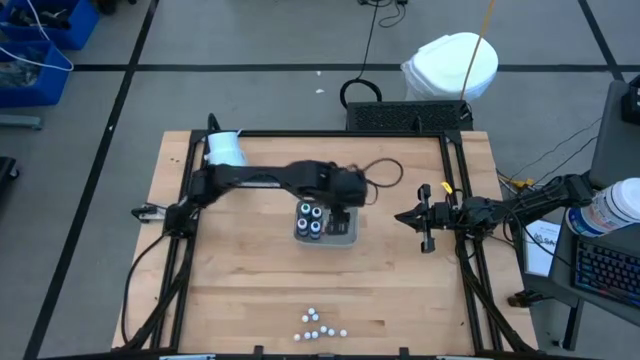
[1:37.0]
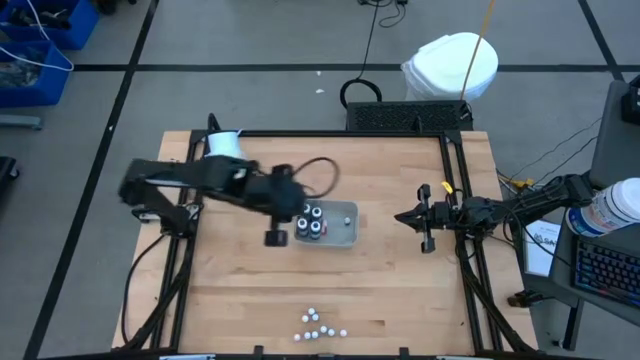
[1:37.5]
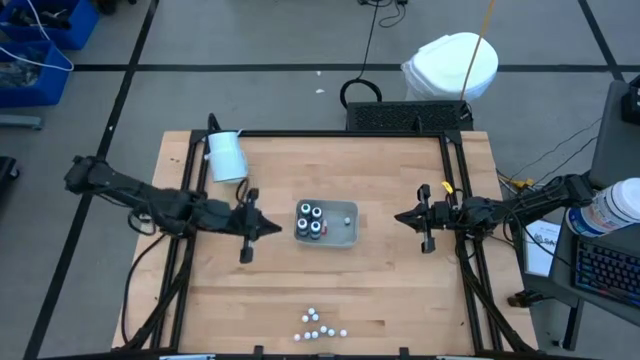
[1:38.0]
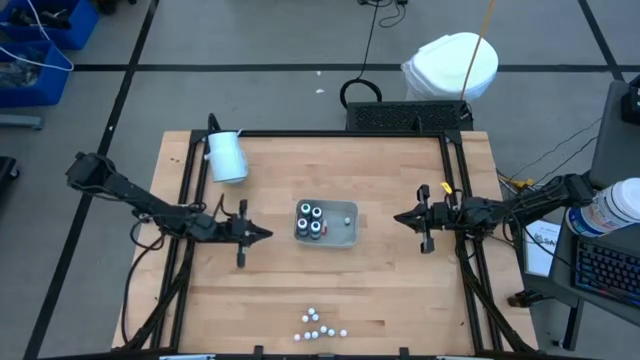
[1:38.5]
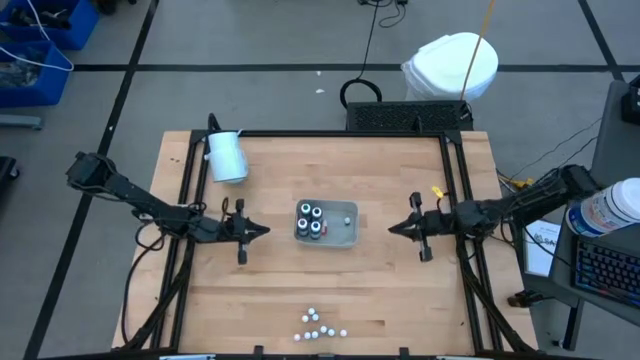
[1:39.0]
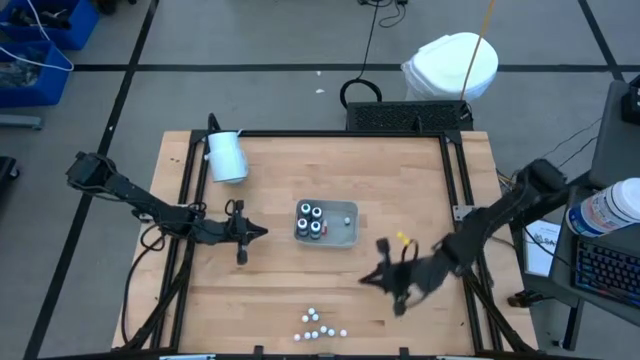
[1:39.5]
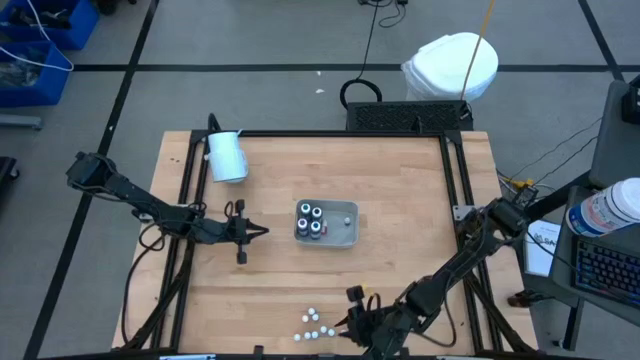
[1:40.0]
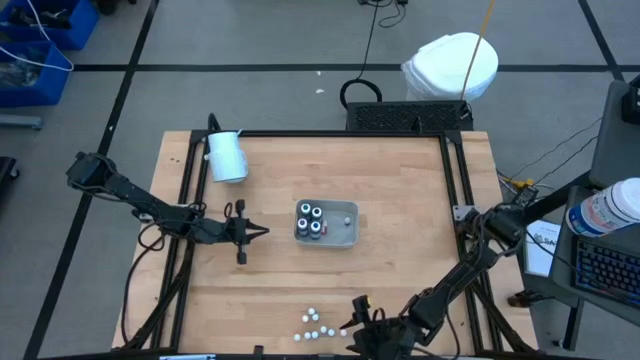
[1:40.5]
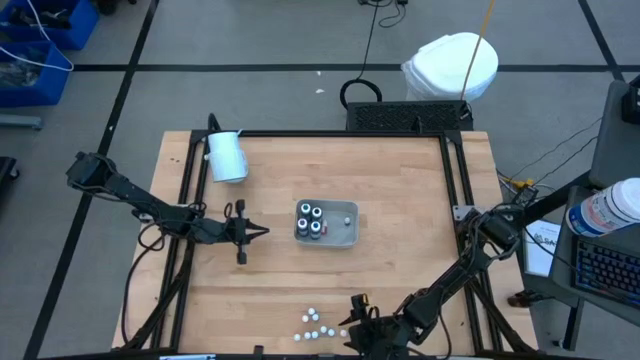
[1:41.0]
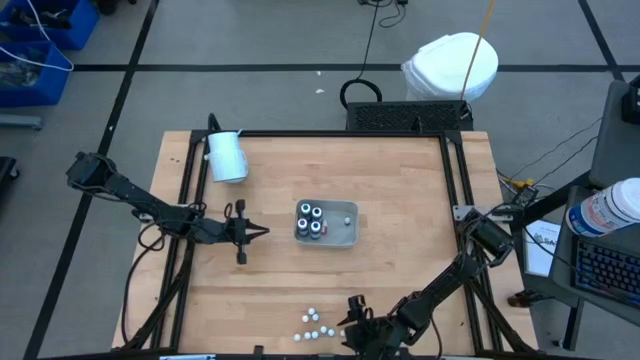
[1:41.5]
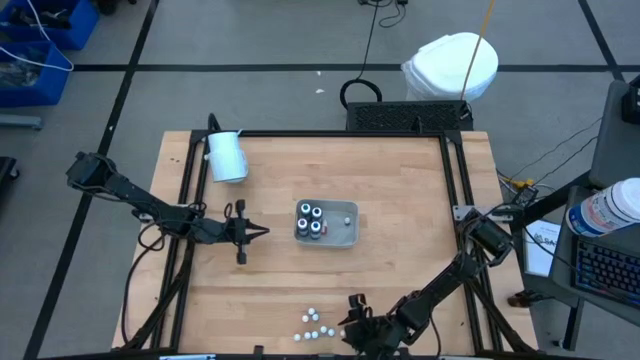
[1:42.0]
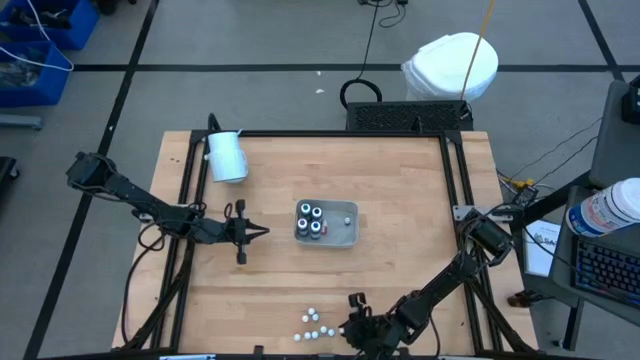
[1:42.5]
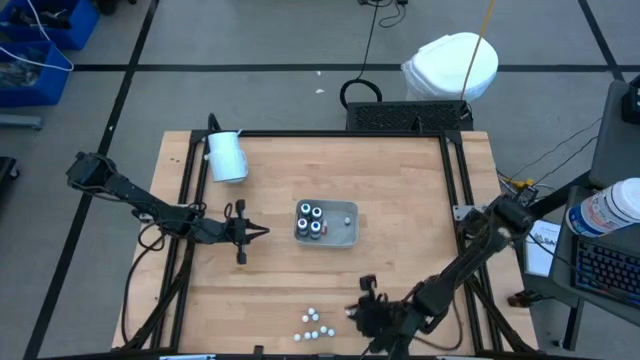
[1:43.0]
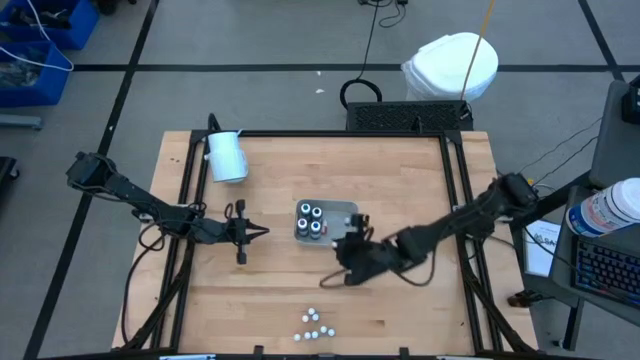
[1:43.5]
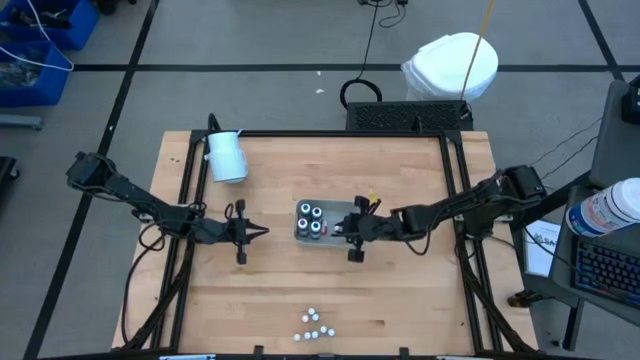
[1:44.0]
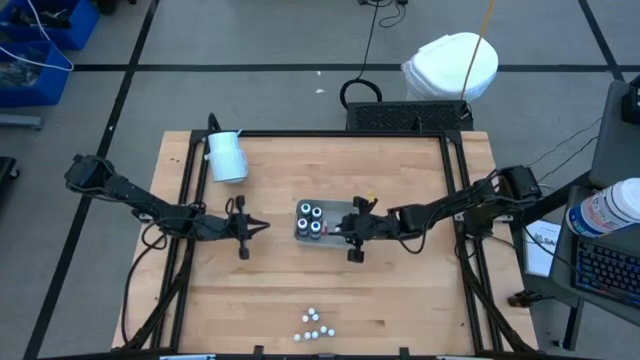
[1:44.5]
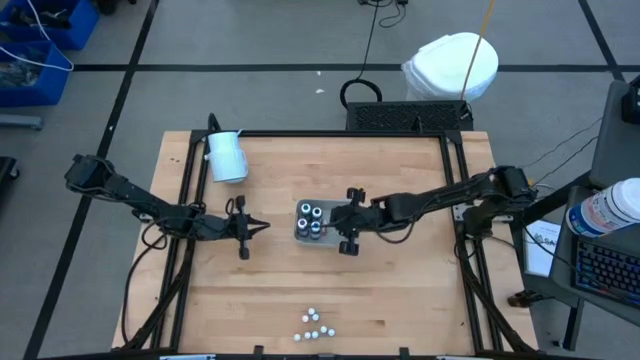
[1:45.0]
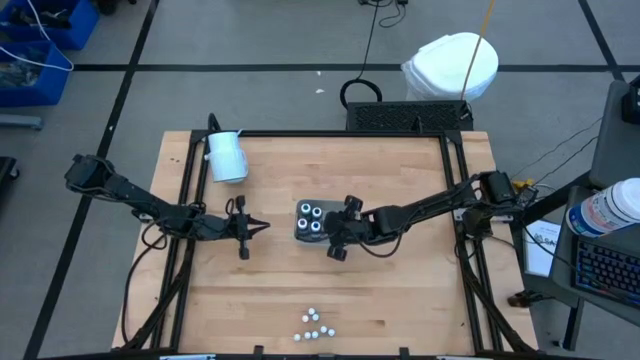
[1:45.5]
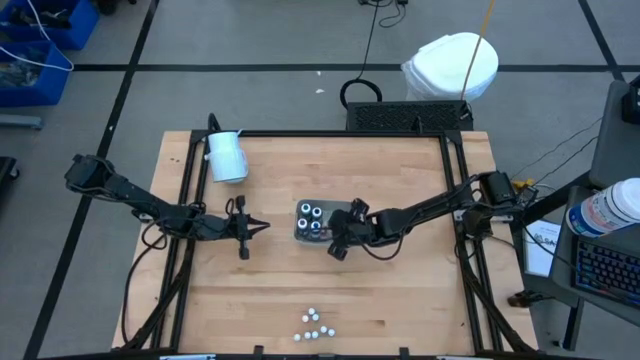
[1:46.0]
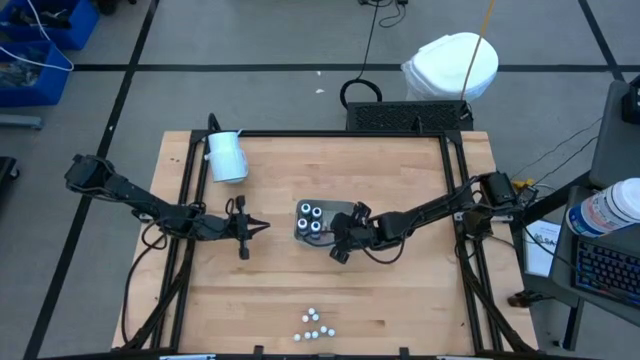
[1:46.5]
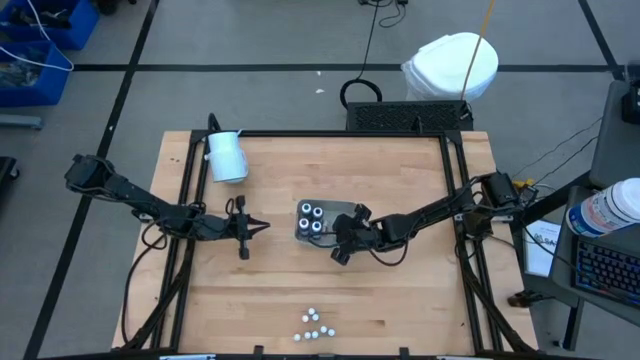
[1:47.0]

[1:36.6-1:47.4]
Task: Pick & Place food coloring
Put the small orange food coloring bottle into the gray bin

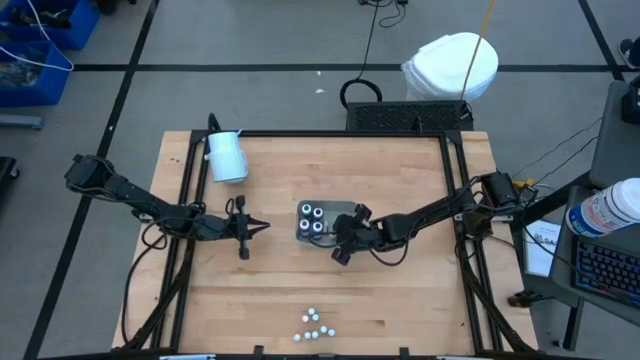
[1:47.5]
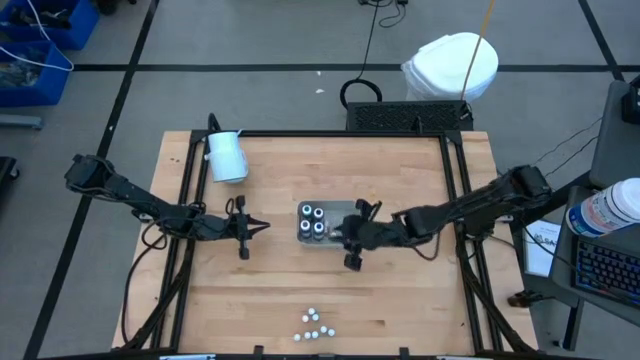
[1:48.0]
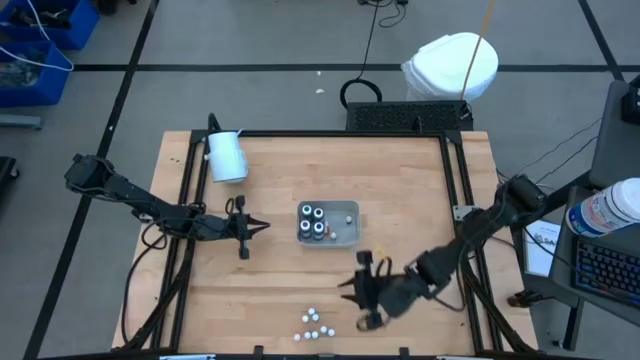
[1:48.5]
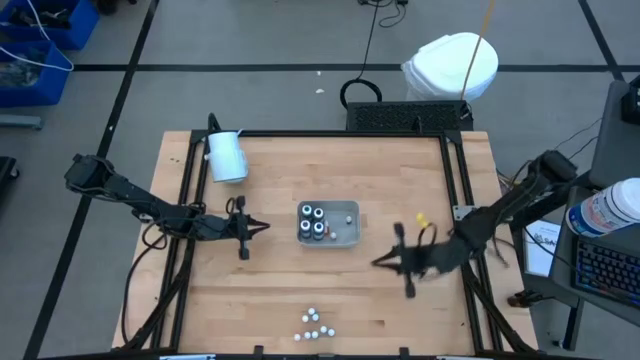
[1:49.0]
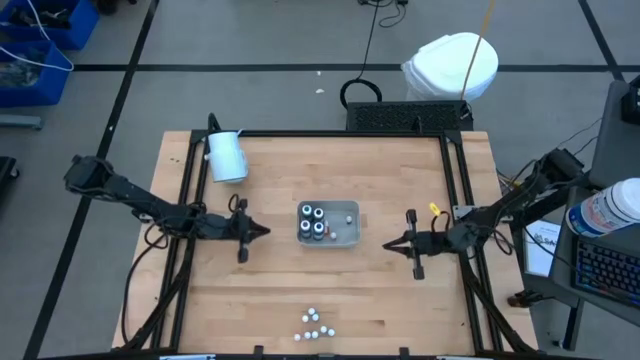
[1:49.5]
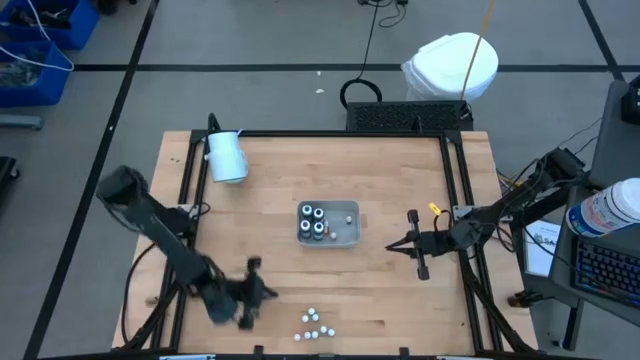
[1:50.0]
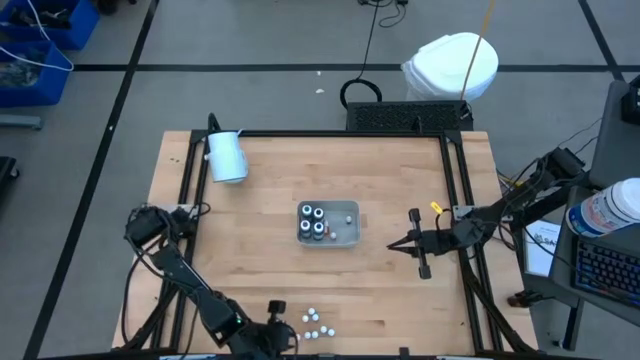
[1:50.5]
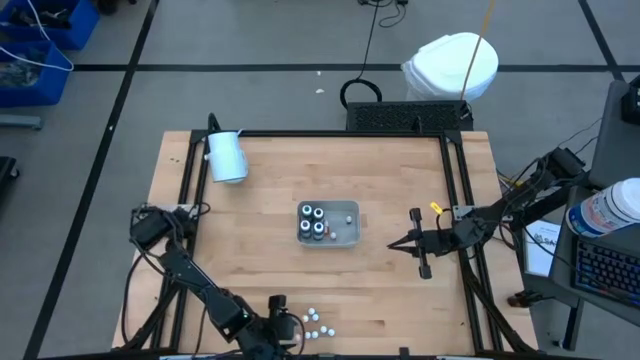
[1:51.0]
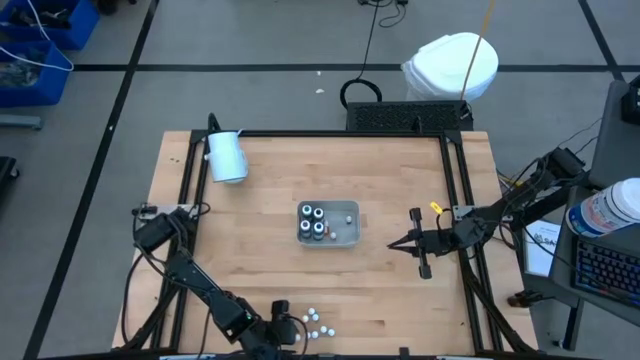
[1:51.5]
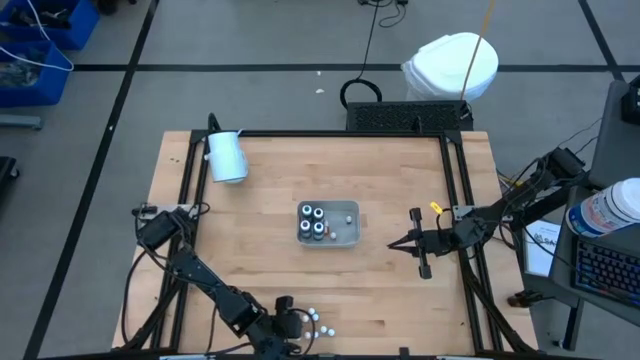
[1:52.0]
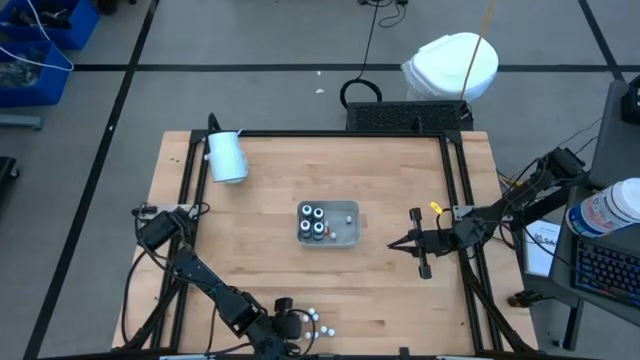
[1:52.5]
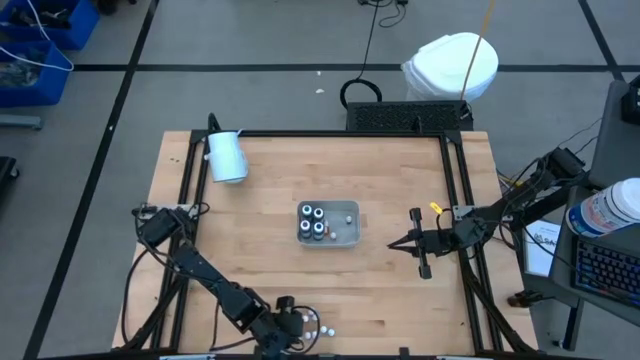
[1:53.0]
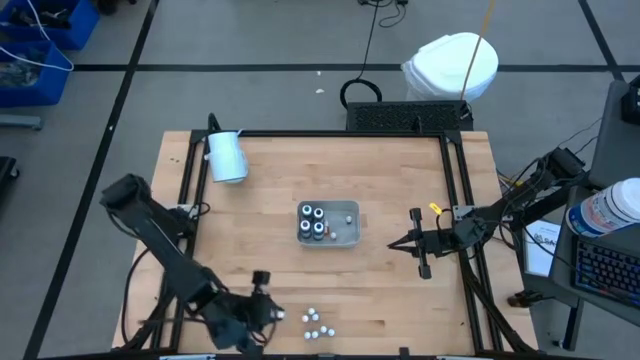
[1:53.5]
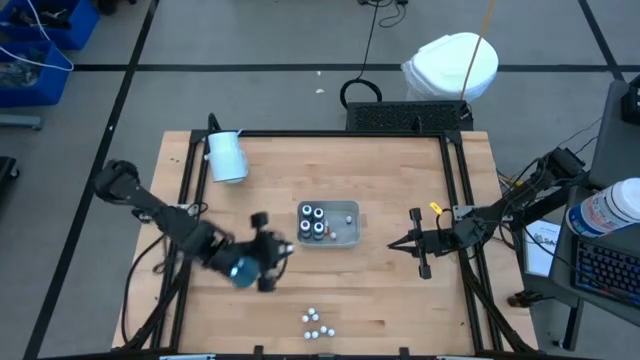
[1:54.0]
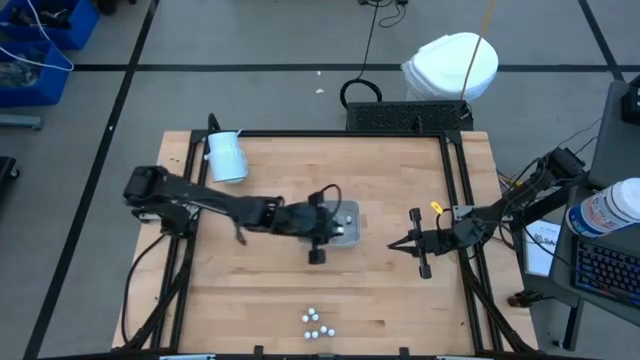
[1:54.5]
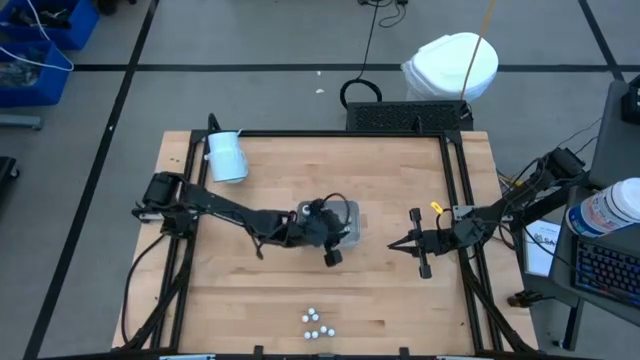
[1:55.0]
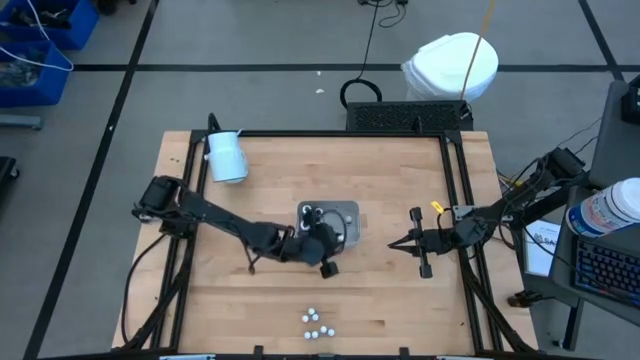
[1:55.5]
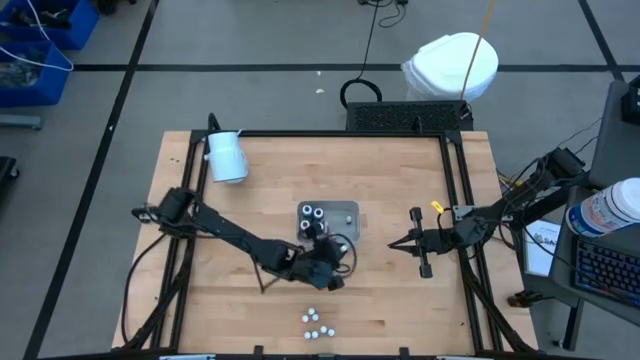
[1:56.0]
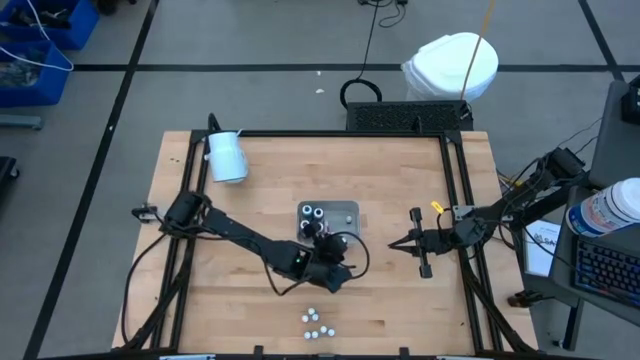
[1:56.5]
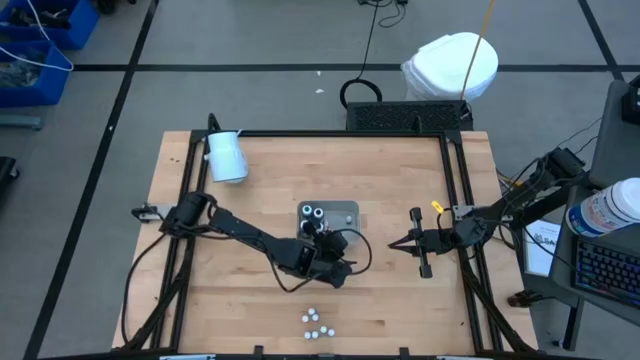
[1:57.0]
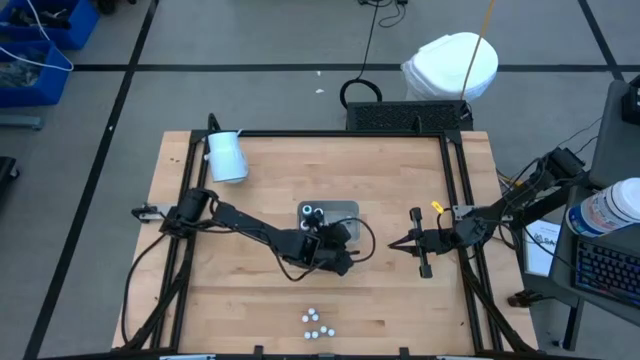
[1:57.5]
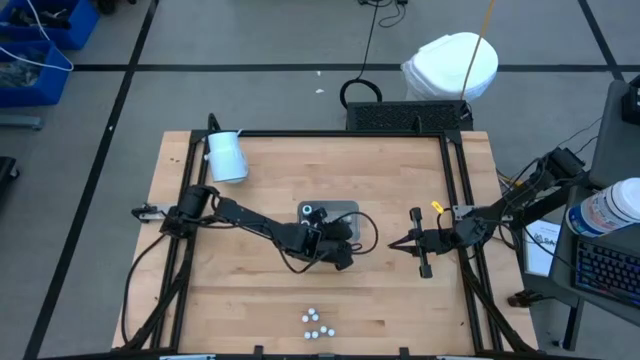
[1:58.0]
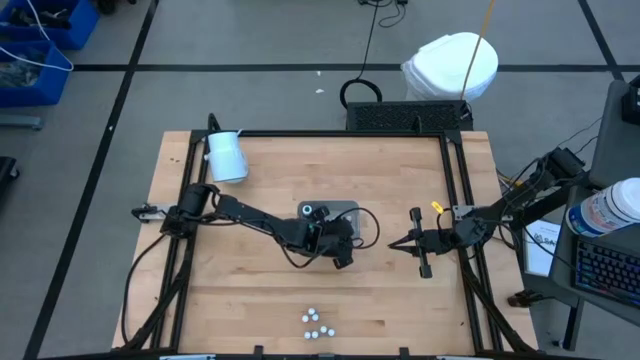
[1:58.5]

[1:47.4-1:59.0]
Put the small orange food coloring bottle into the gray bin
